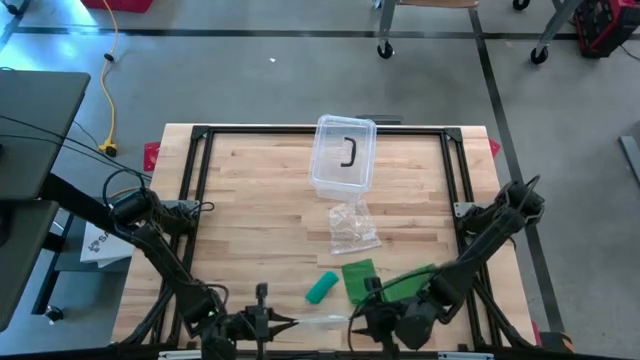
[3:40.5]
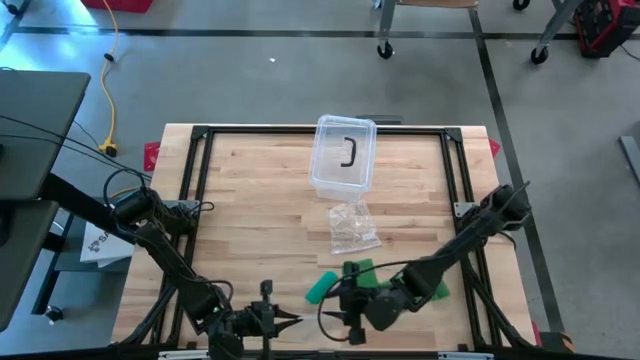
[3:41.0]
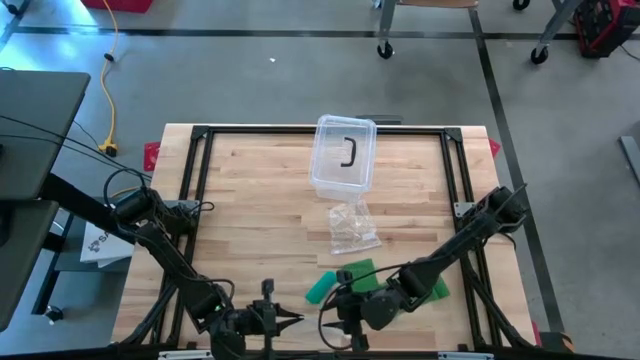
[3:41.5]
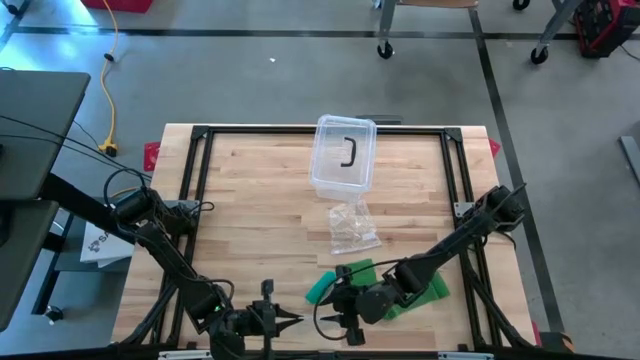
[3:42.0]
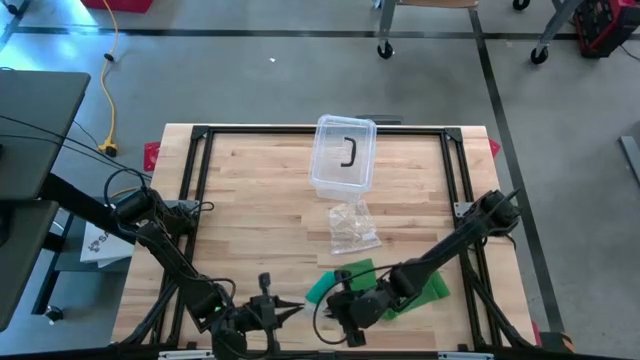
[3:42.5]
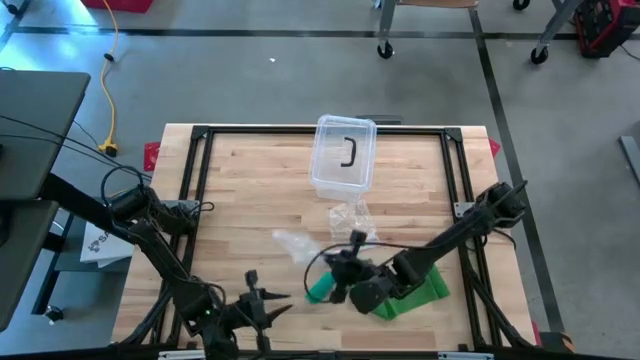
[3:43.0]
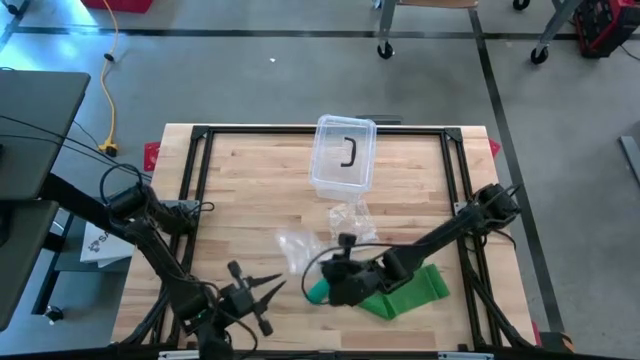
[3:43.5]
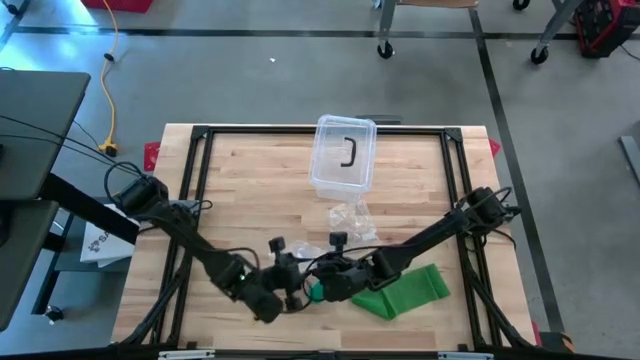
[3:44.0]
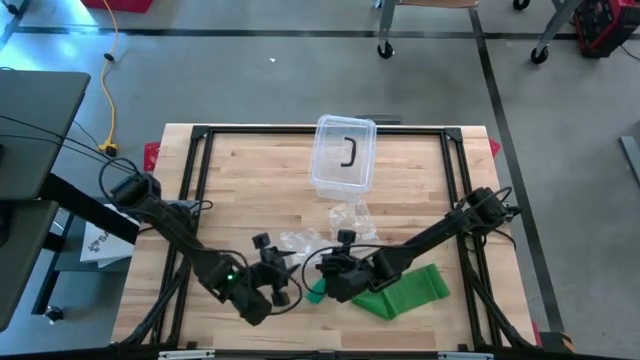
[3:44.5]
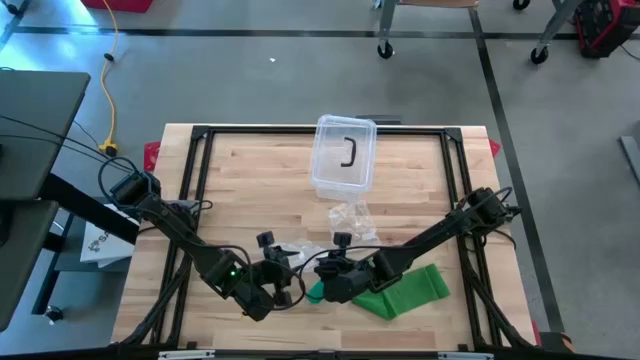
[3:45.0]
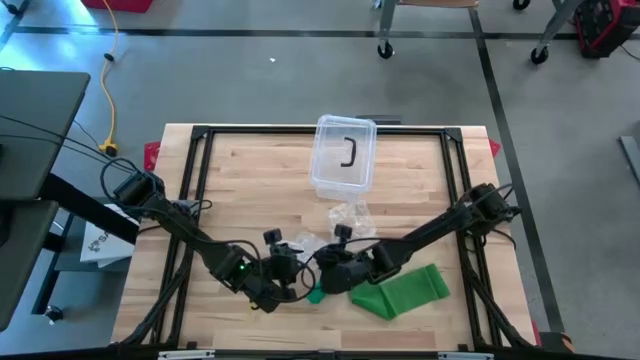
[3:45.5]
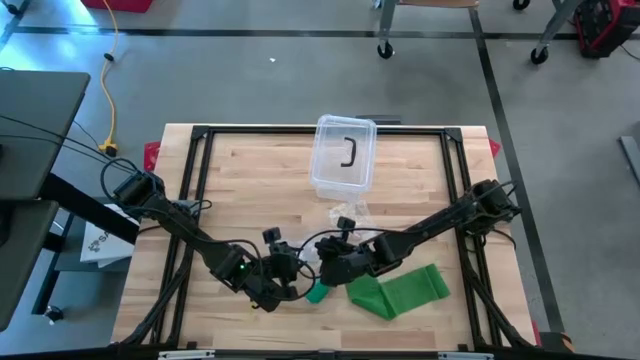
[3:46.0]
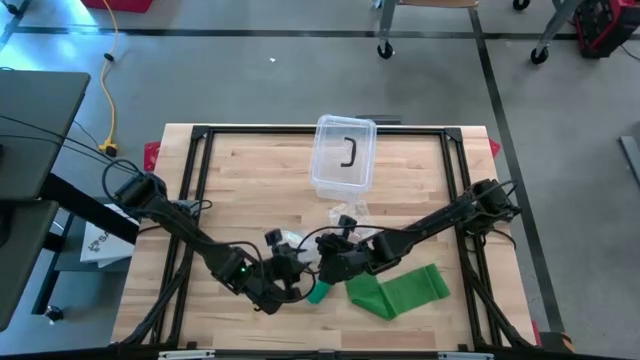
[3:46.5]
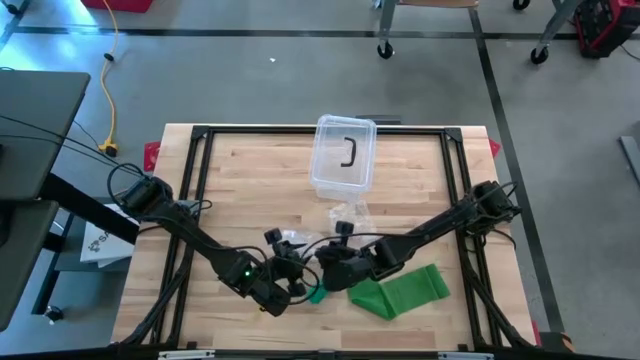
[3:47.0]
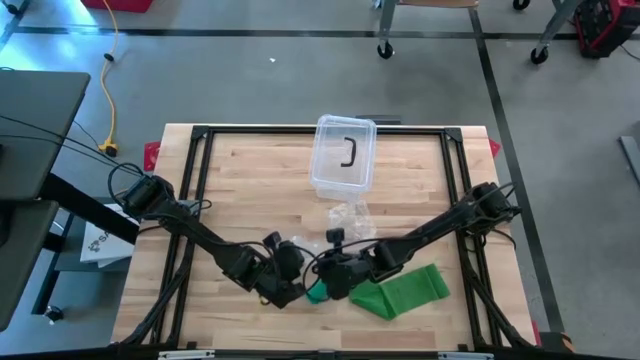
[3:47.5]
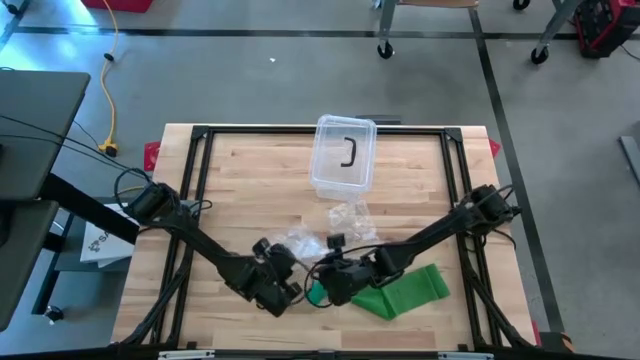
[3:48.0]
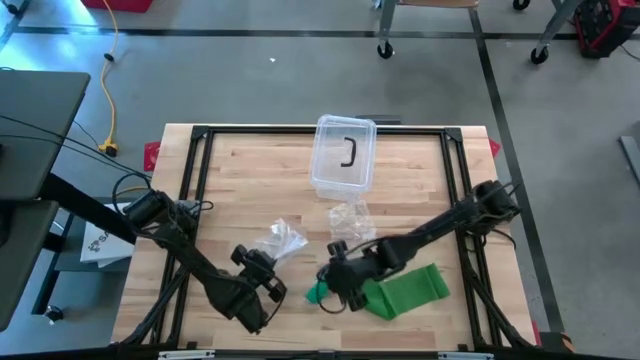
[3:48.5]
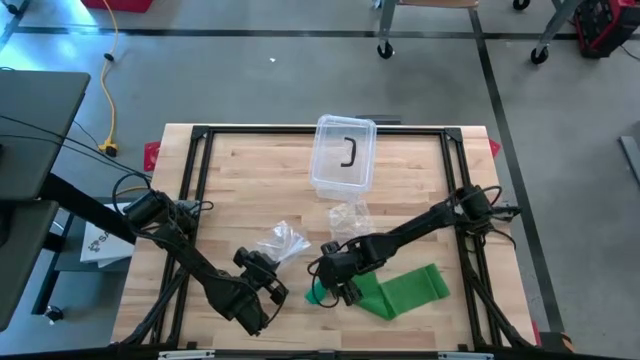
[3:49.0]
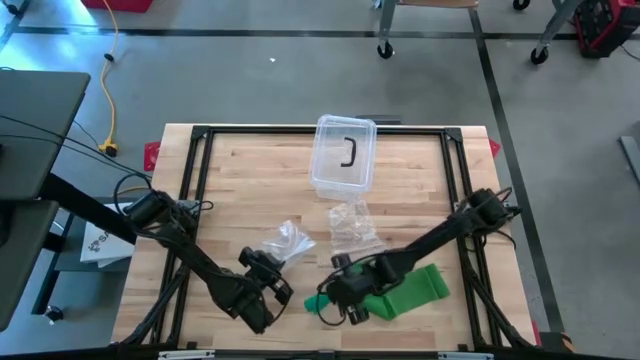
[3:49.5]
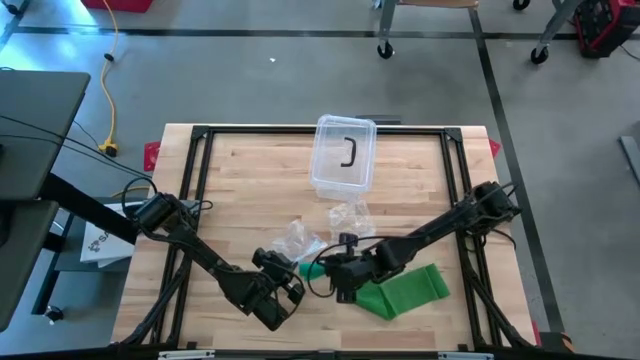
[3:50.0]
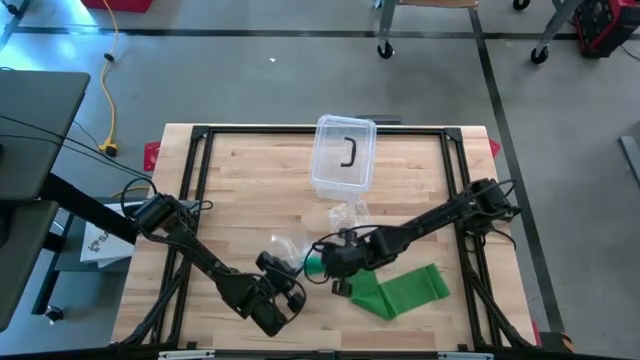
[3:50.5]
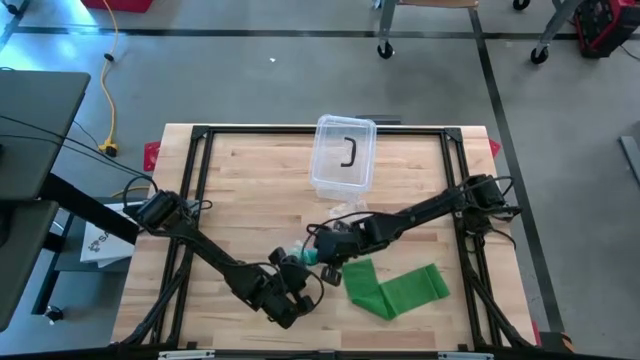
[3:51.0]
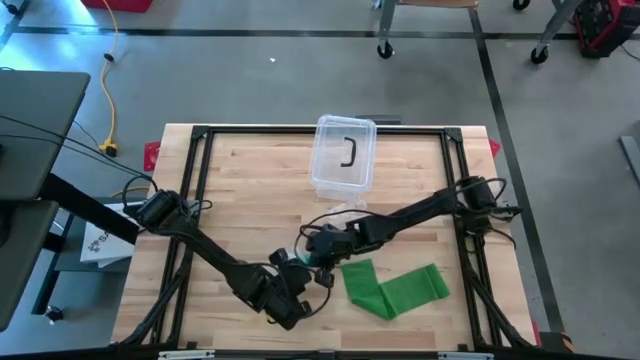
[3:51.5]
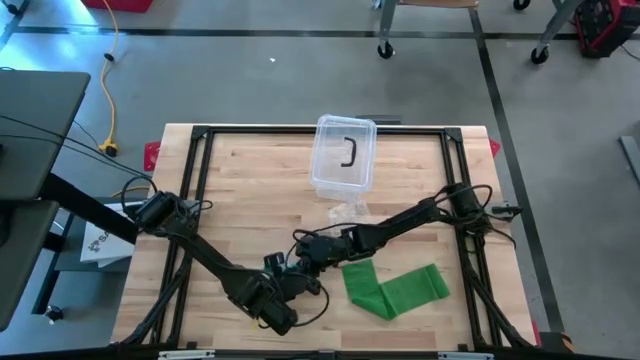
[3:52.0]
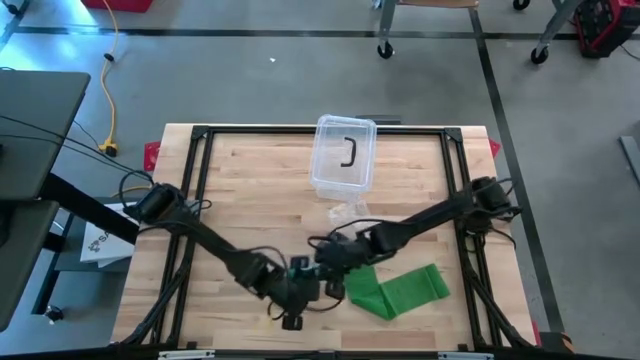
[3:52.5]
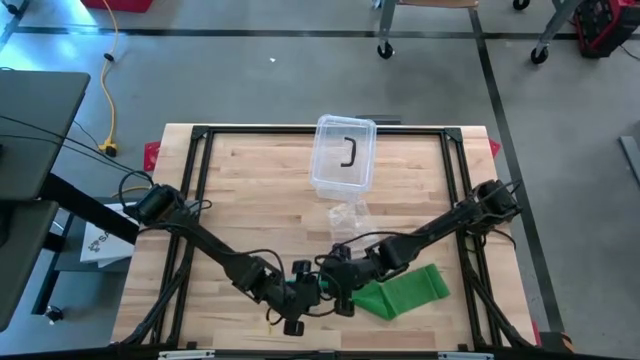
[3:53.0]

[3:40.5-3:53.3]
Task: Roll bandage
Put the blue bandage into the transparent zip bag
